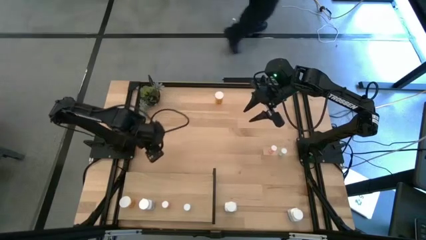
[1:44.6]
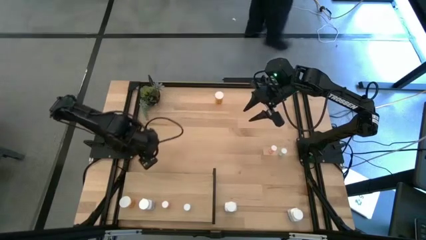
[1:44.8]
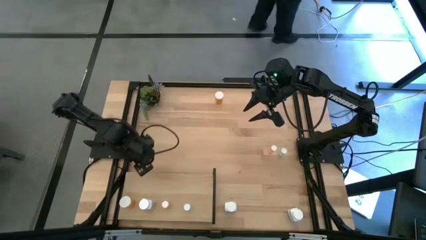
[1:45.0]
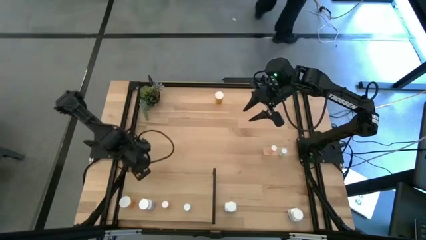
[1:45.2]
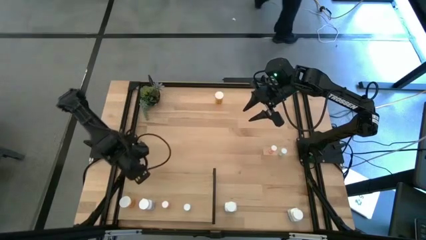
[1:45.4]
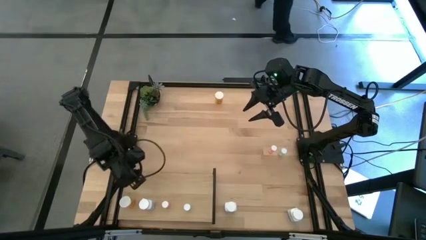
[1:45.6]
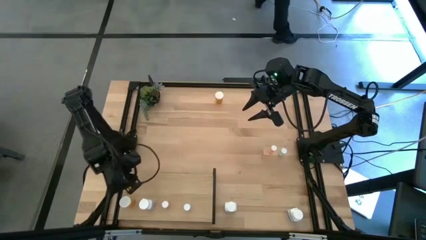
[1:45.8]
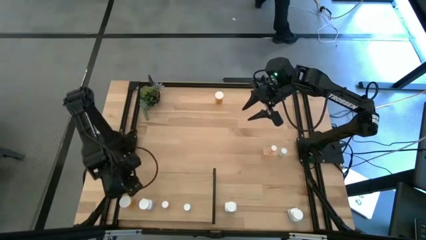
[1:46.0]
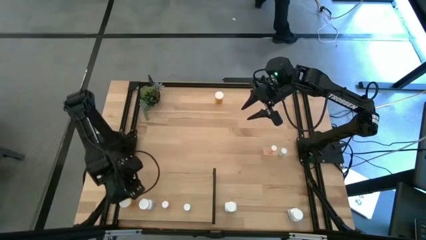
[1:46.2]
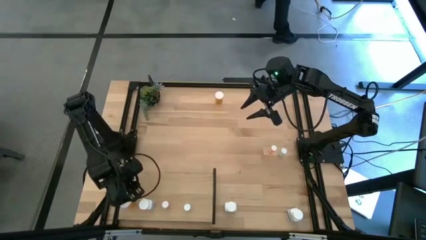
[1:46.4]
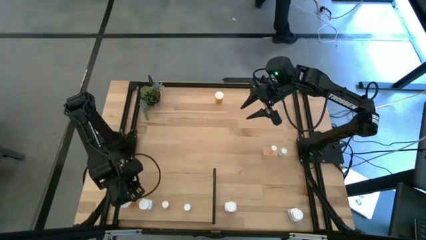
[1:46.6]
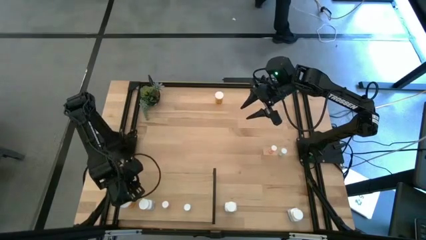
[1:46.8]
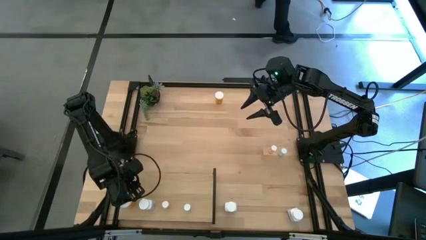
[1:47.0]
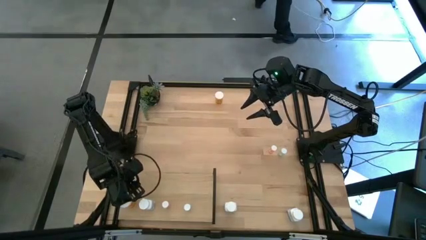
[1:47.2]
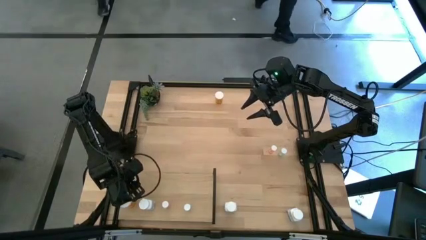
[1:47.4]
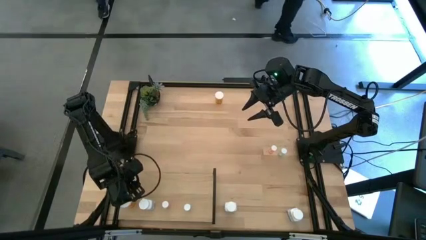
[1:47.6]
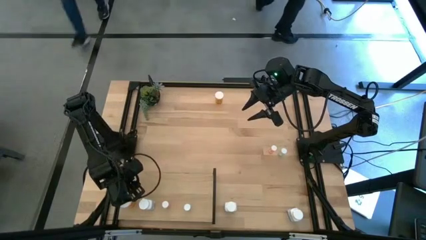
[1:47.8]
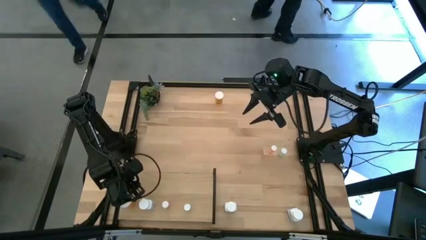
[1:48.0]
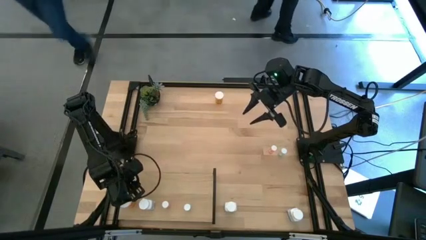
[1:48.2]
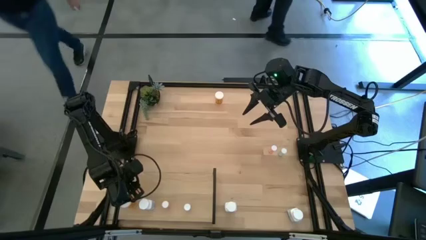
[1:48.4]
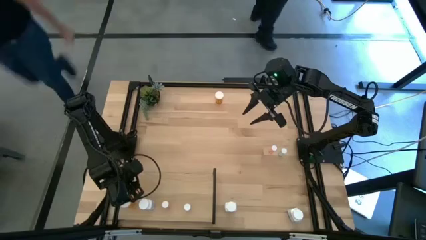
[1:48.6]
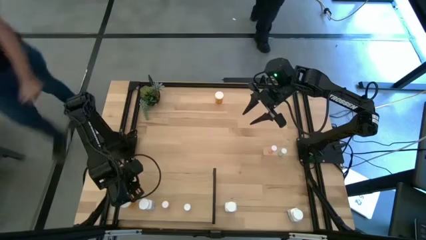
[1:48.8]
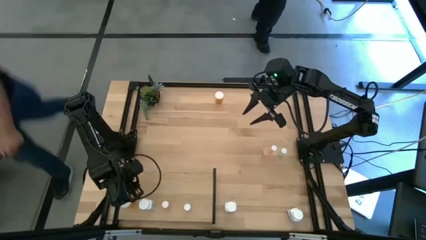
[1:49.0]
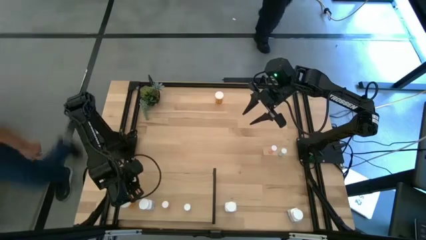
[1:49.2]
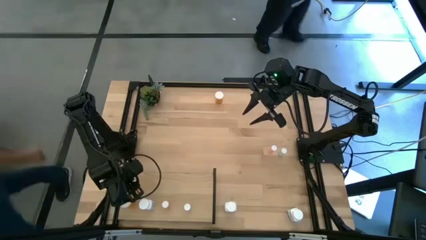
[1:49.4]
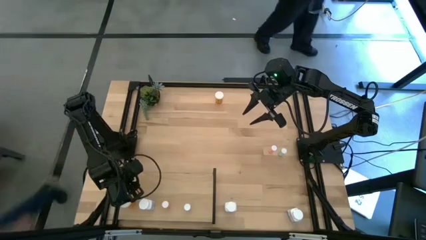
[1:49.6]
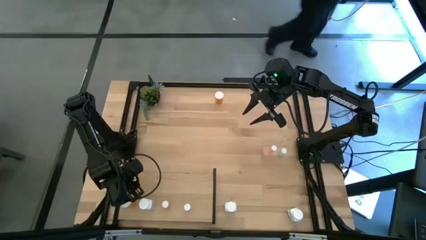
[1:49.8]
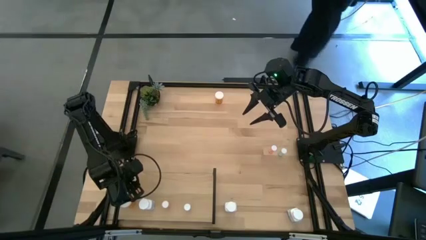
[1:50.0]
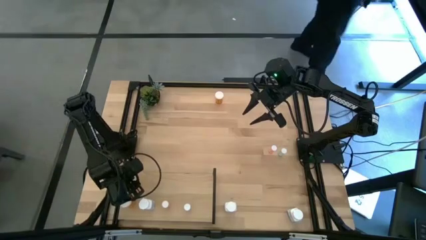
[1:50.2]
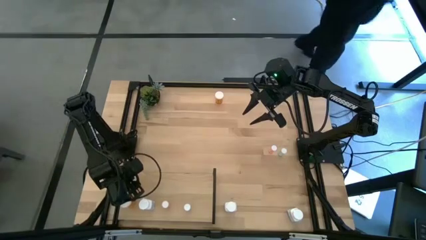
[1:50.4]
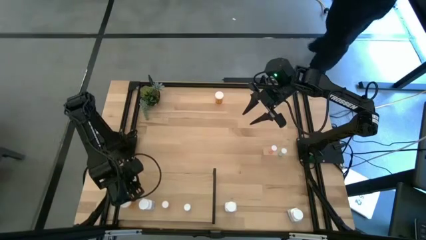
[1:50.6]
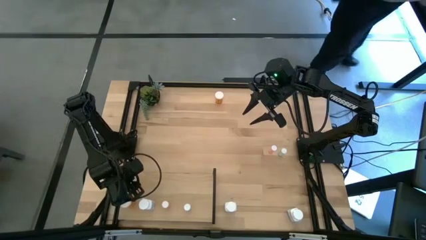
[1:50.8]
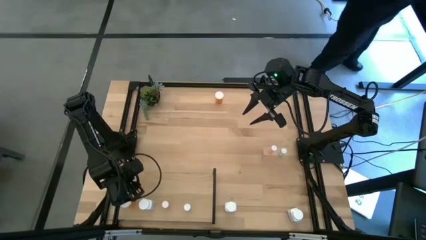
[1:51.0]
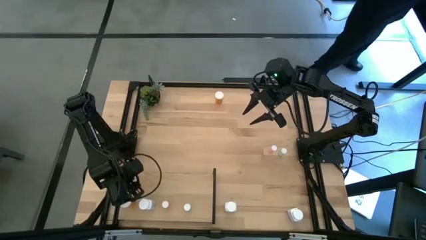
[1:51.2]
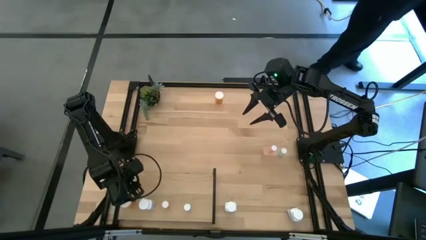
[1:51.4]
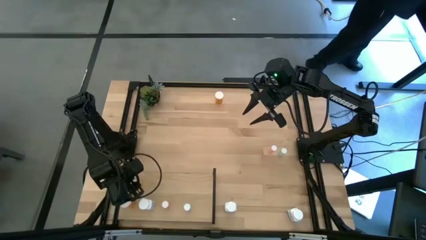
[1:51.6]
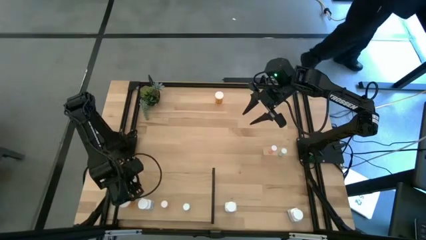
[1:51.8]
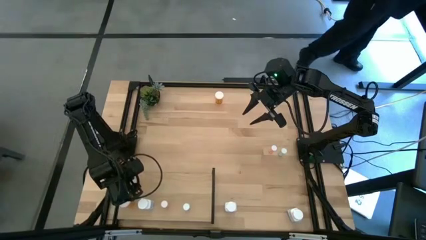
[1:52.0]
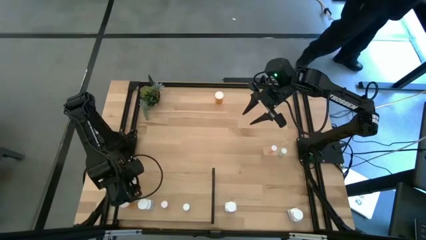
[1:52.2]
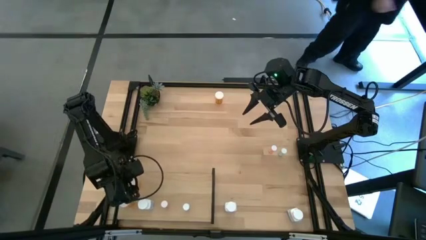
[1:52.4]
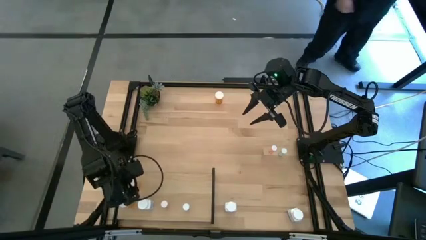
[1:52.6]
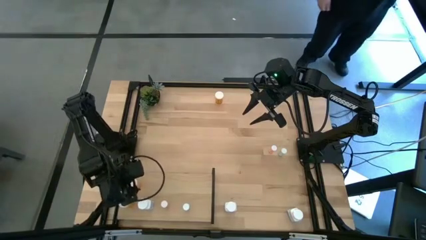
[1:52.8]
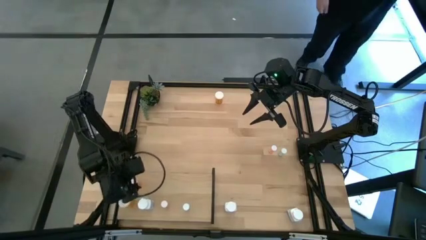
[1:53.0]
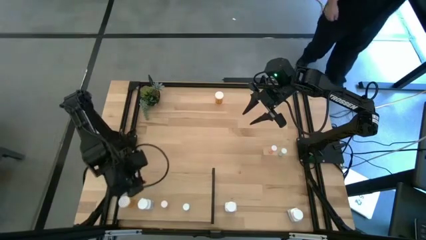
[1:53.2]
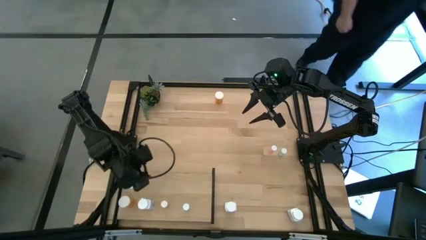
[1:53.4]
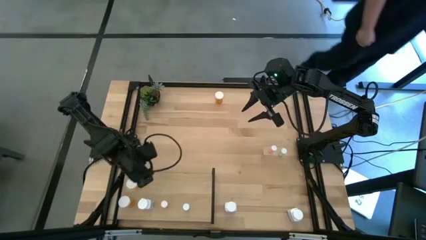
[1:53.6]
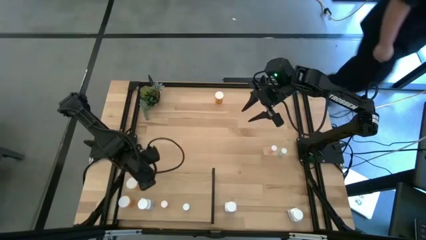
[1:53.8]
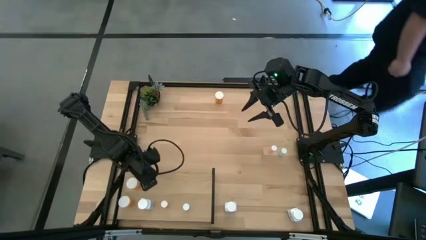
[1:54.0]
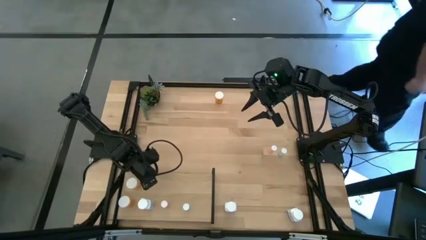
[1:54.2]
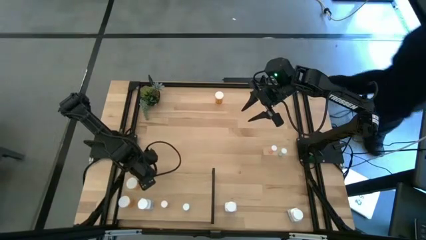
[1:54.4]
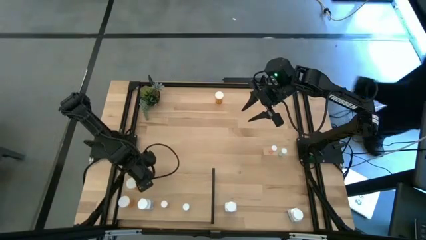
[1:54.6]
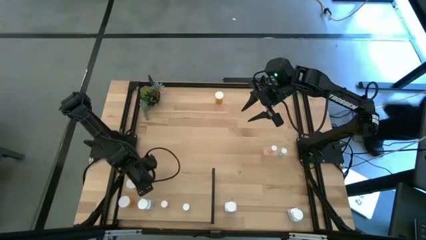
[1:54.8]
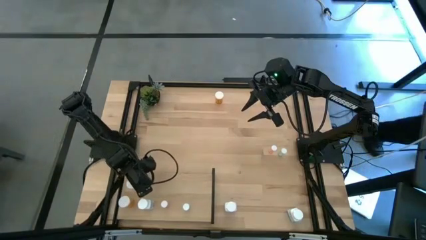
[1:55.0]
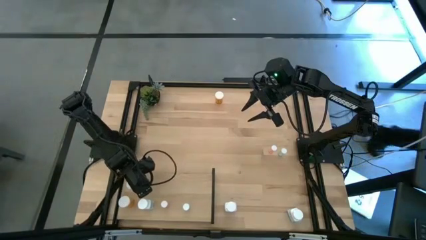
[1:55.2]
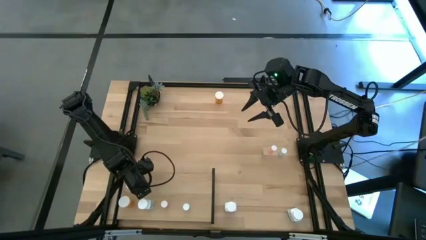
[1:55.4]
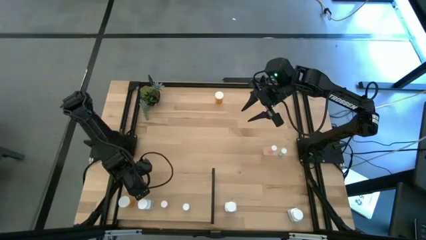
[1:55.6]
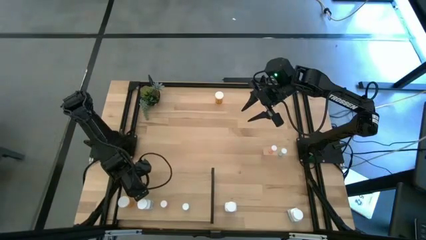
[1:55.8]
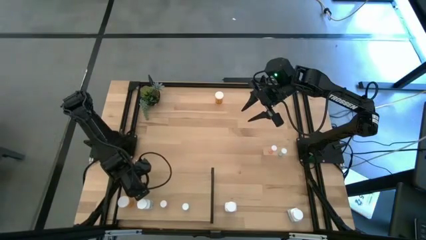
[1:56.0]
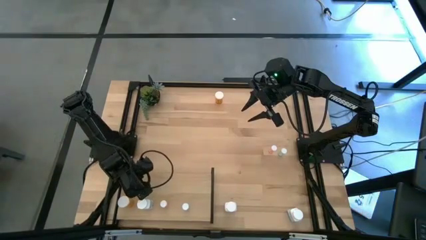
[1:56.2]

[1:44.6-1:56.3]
Task: Pick and place medicine bottles onto shelf by color
Put the bottom big orange pill bottle on the shelf aligned with the other big orange pill bottle
